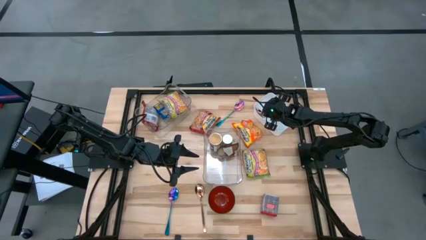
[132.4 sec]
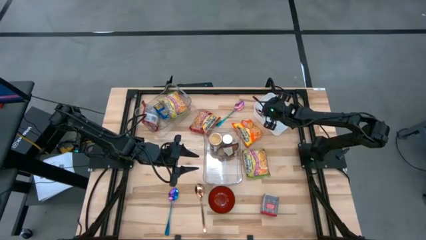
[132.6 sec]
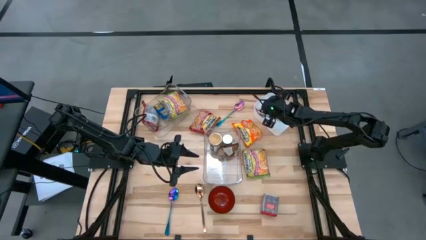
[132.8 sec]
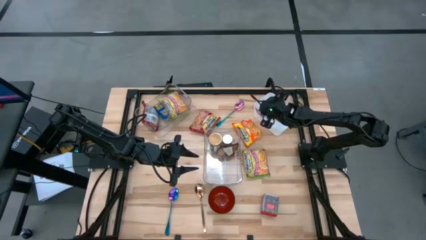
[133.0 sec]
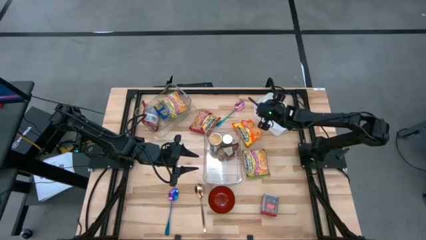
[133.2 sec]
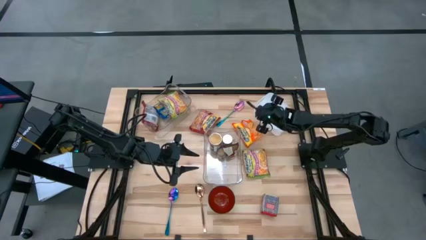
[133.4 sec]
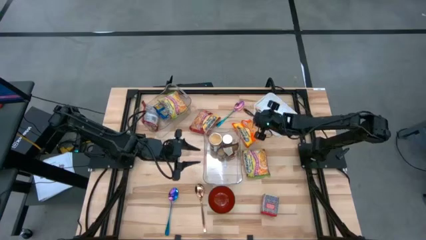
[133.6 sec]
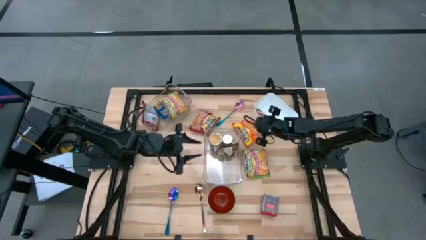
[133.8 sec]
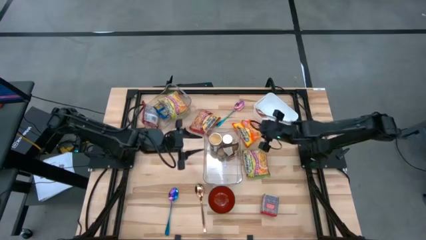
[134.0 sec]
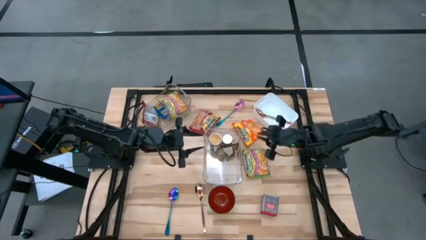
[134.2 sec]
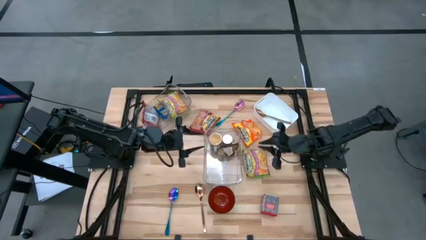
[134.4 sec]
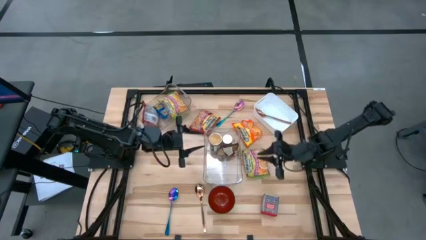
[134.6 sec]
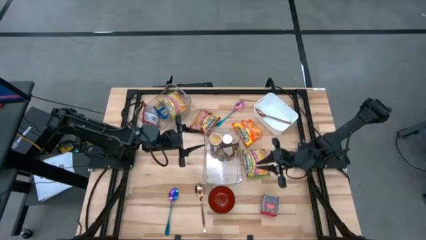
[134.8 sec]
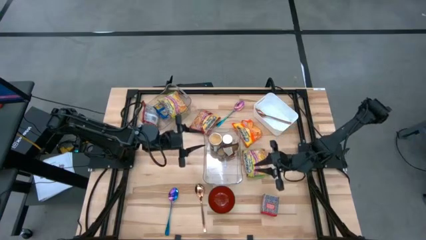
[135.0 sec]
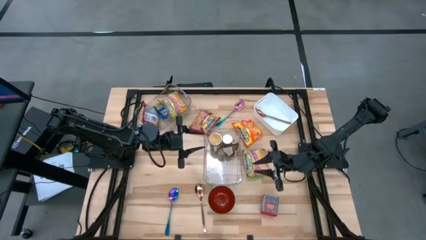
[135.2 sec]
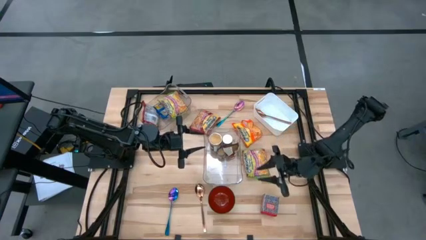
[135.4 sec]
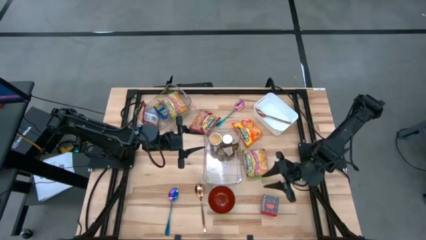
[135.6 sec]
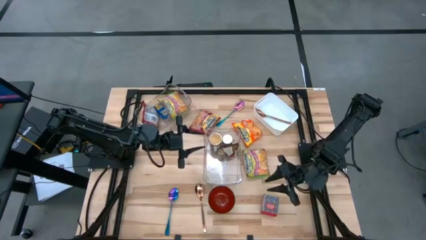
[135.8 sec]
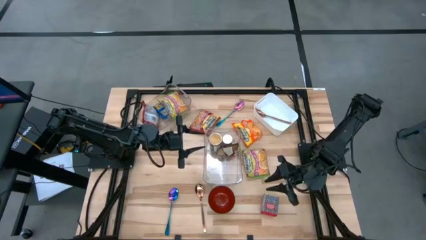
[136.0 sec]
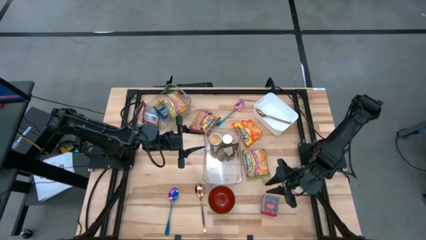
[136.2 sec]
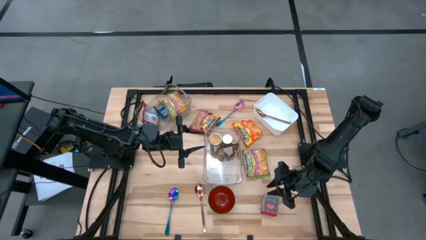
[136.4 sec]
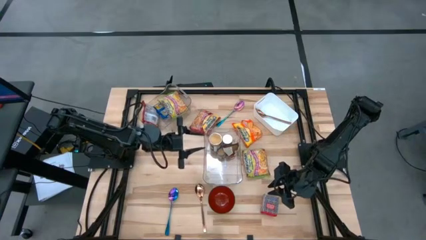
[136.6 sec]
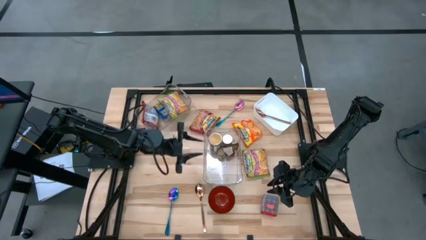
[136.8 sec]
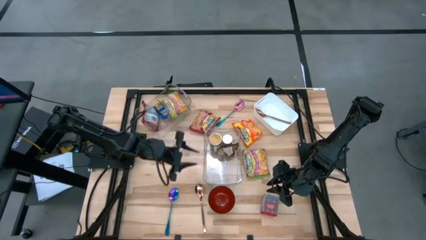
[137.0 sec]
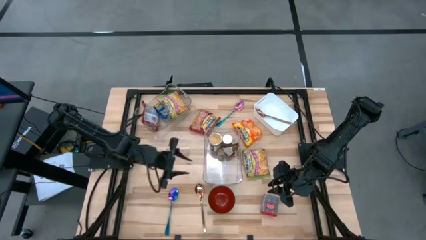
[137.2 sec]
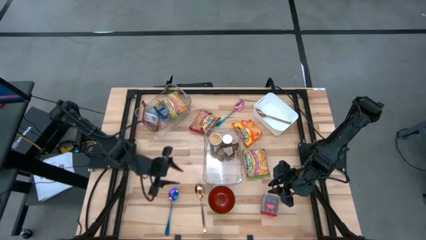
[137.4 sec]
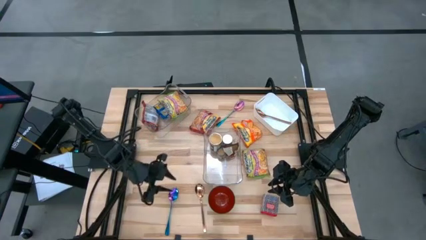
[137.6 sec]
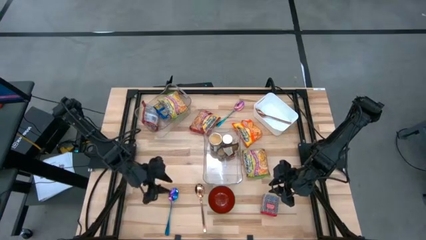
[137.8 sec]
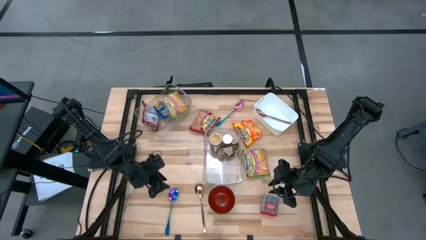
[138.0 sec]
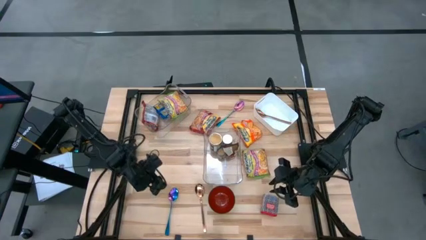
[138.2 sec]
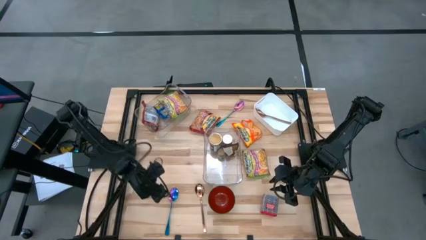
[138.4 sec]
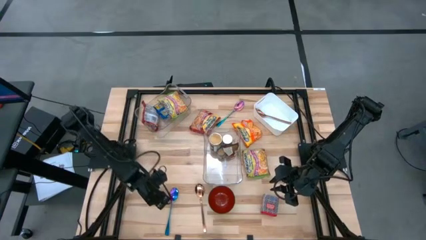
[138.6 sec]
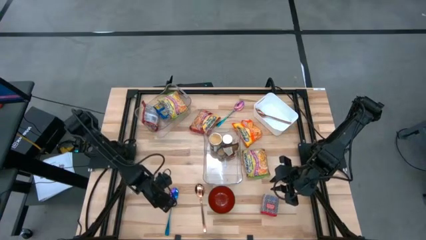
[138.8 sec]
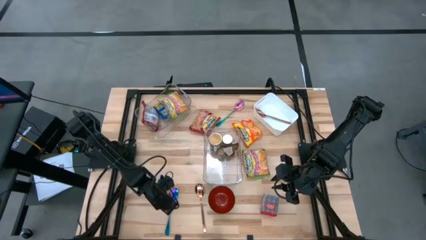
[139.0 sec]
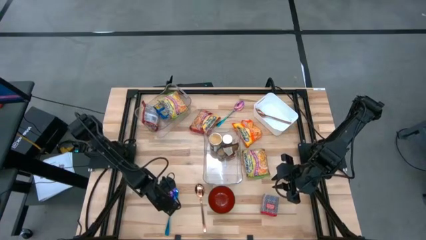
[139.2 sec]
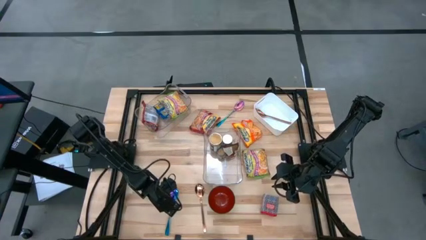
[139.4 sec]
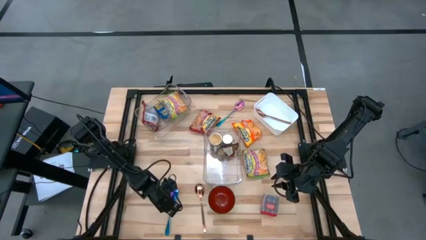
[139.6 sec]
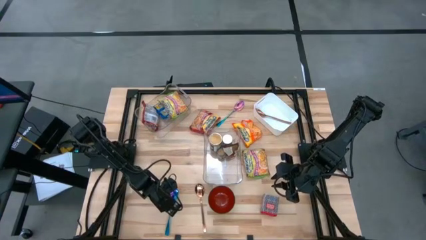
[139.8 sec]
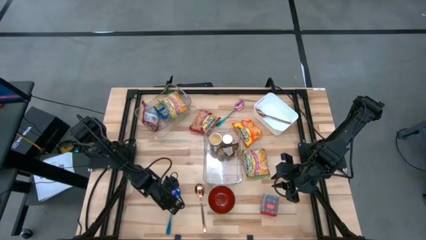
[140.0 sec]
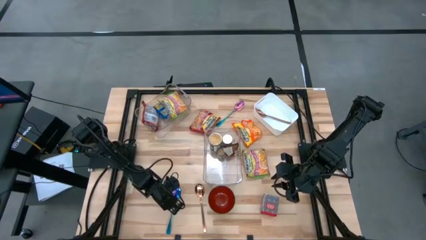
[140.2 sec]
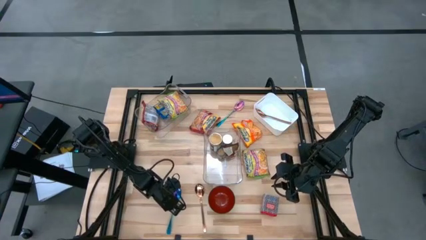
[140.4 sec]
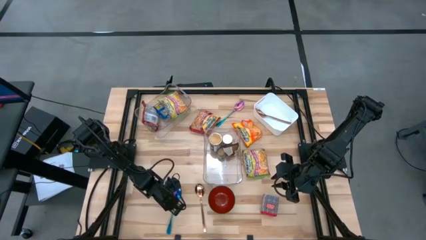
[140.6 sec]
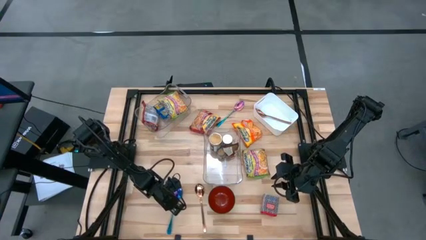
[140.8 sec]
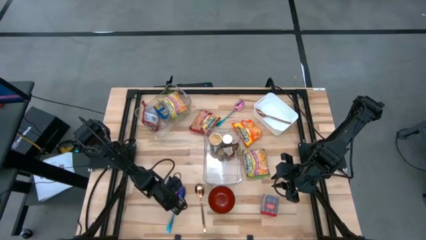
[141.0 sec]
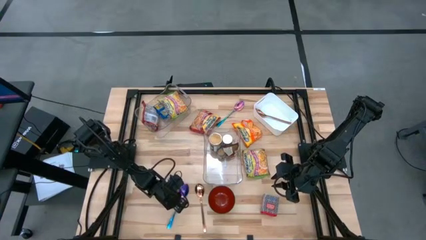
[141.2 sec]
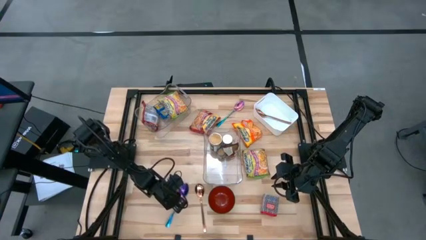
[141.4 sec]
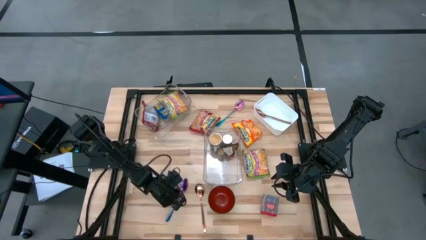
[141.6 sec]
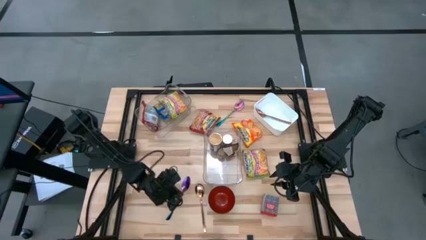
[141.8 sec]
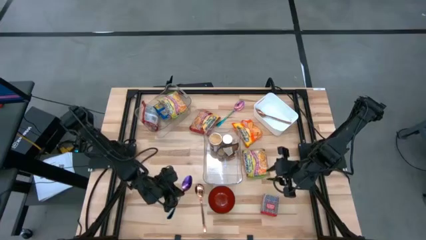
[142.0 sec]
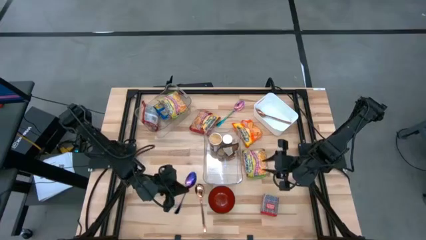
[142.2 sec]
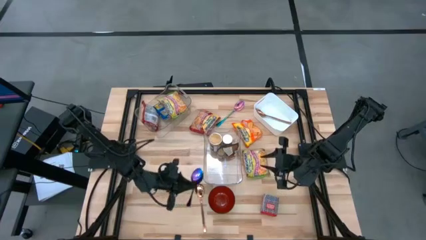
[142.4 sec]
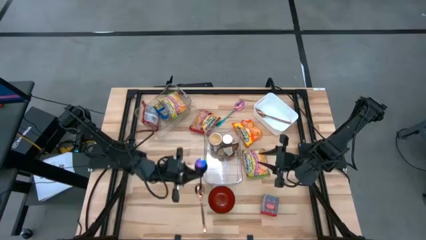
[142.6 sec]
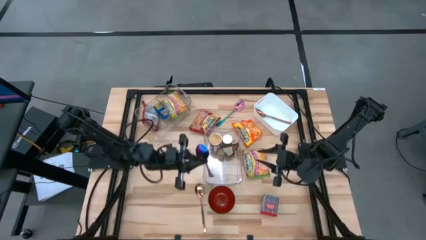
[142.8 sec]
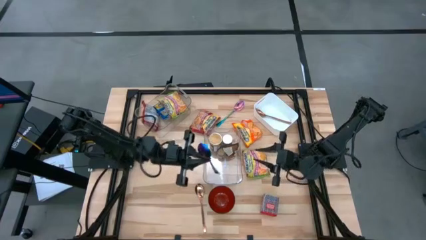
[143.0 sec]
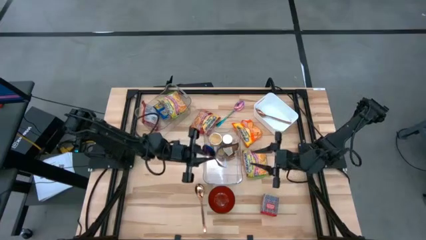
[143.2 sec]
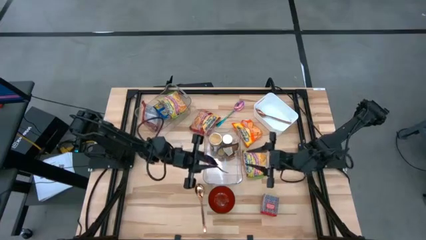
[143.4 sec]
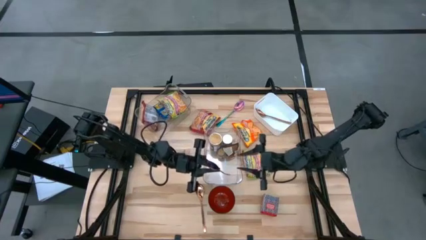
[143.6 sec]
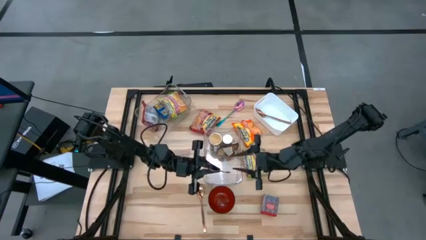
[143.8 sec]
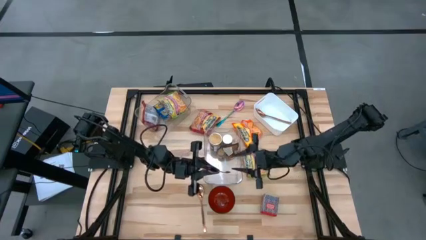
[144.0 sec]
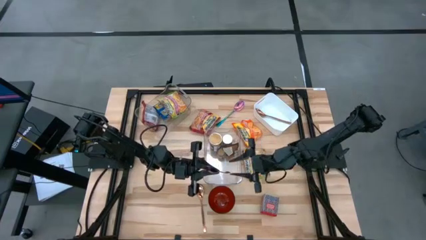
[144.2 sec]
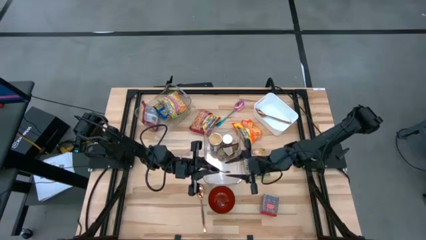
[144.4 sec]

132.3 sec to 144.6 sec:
Task: Pick & Place Food Item
Put the bottom blue spoon into the white bin
